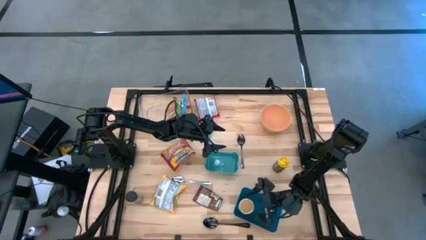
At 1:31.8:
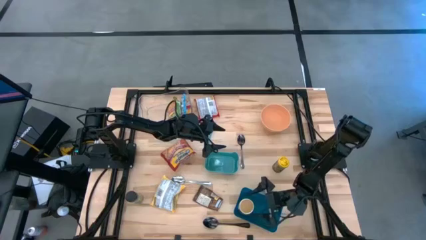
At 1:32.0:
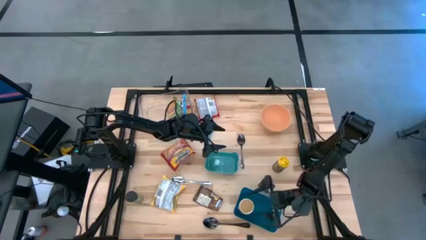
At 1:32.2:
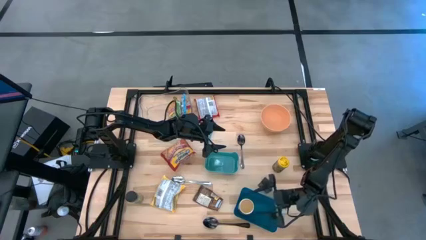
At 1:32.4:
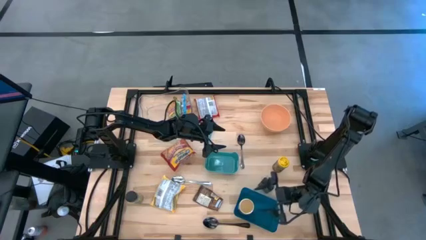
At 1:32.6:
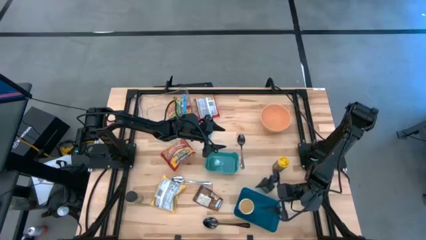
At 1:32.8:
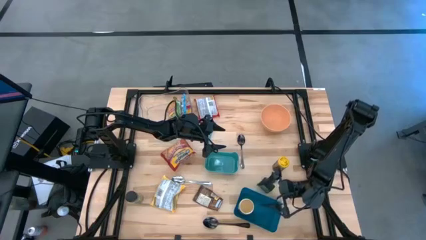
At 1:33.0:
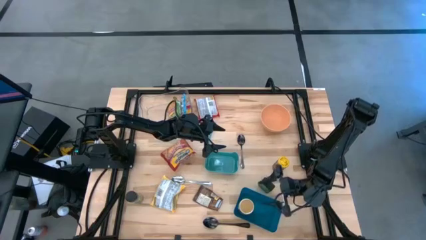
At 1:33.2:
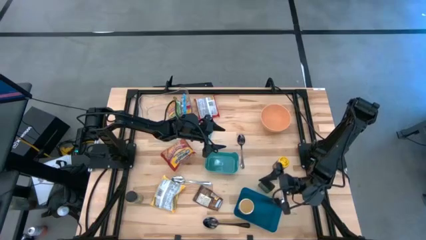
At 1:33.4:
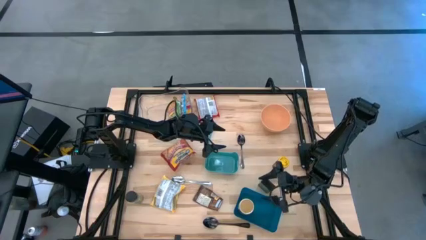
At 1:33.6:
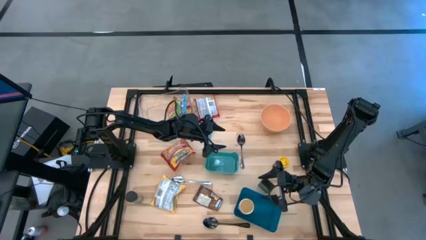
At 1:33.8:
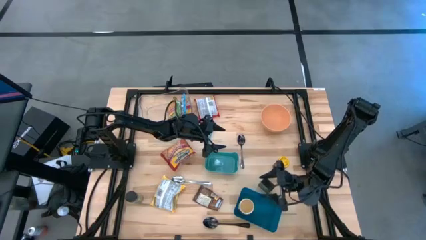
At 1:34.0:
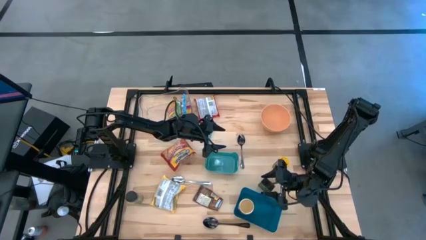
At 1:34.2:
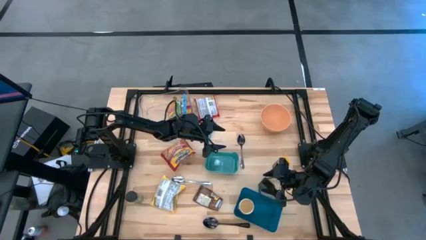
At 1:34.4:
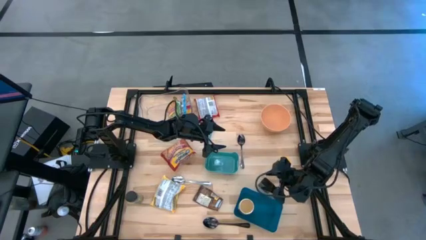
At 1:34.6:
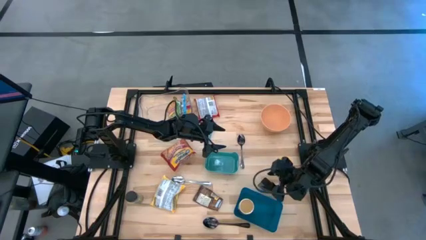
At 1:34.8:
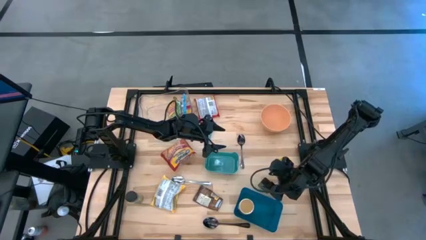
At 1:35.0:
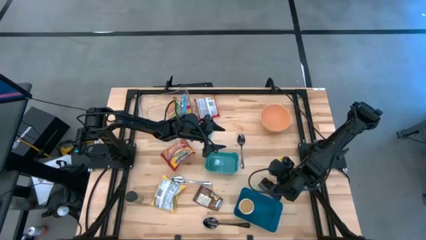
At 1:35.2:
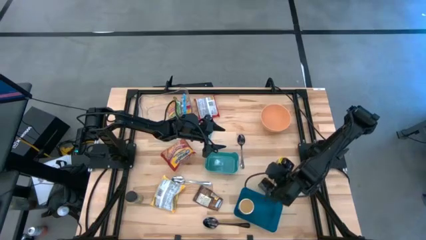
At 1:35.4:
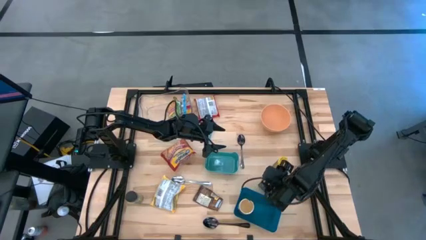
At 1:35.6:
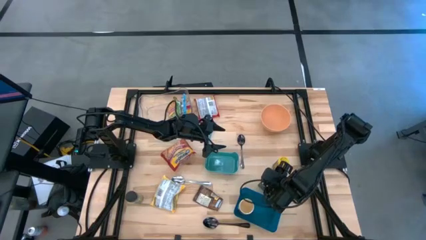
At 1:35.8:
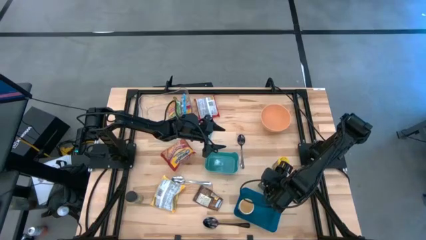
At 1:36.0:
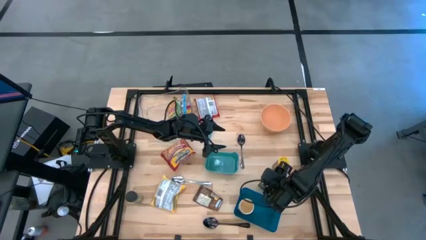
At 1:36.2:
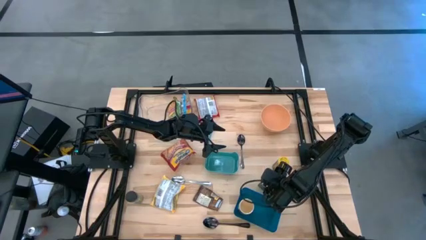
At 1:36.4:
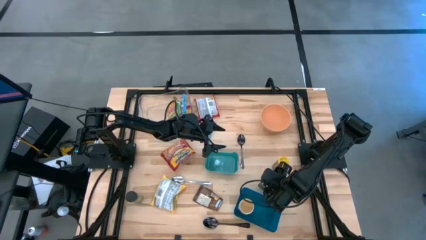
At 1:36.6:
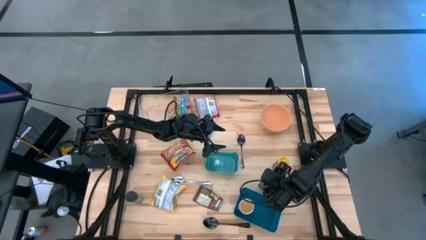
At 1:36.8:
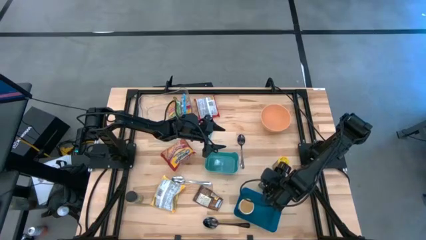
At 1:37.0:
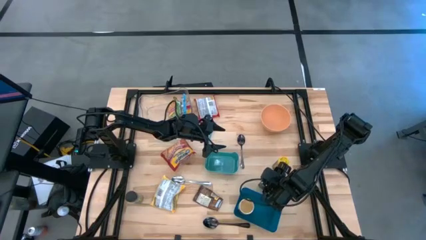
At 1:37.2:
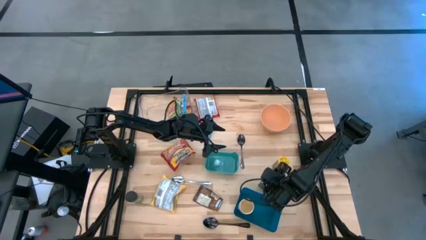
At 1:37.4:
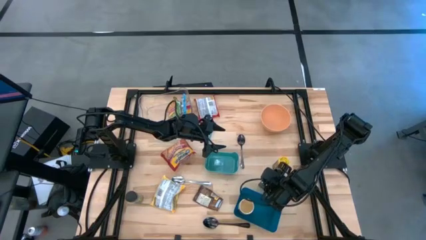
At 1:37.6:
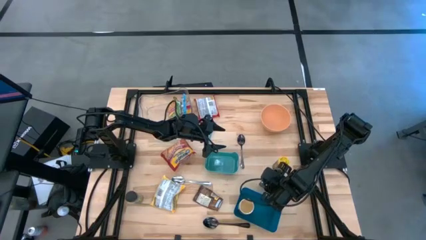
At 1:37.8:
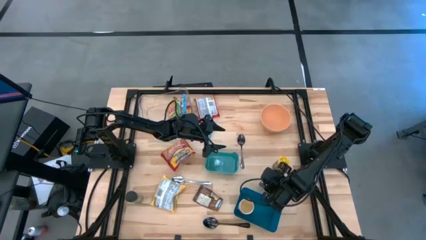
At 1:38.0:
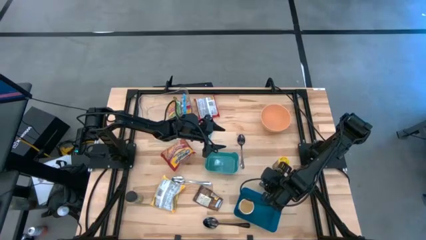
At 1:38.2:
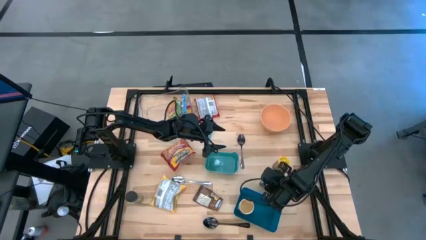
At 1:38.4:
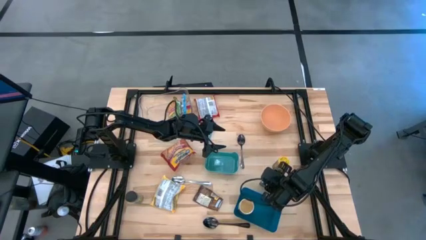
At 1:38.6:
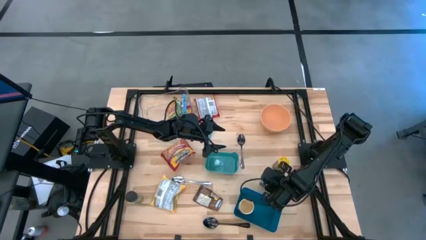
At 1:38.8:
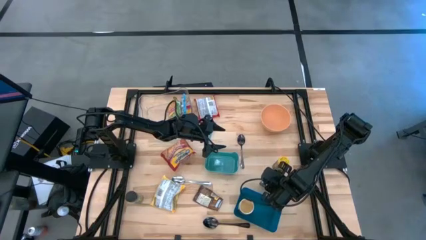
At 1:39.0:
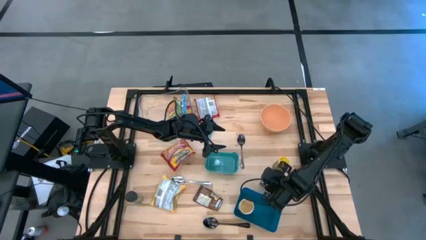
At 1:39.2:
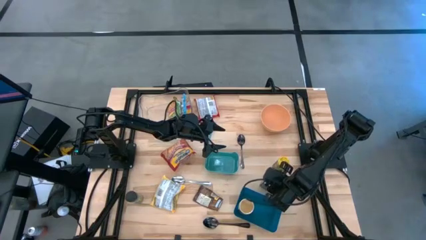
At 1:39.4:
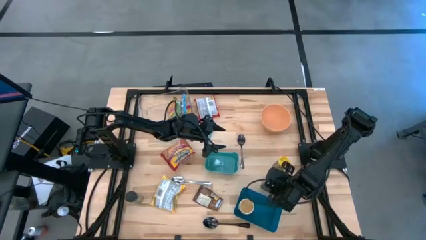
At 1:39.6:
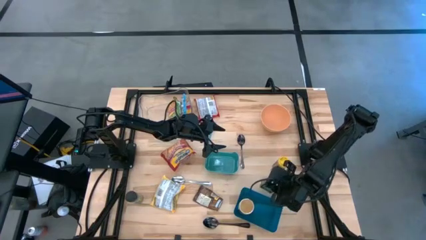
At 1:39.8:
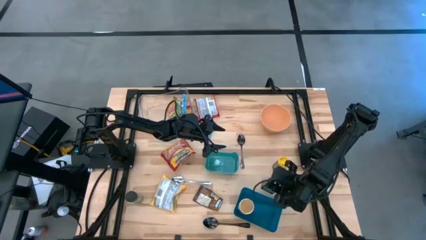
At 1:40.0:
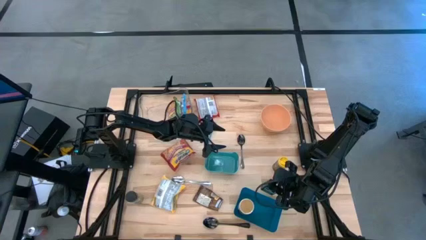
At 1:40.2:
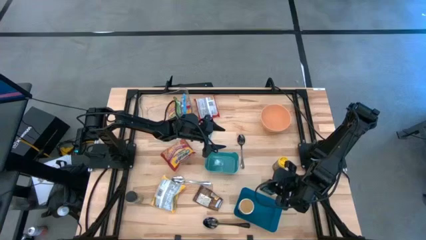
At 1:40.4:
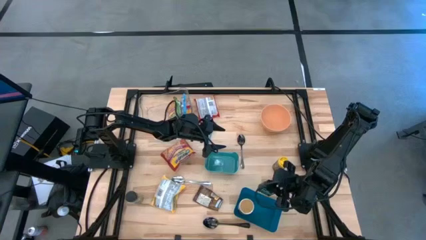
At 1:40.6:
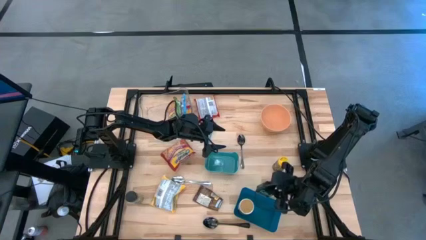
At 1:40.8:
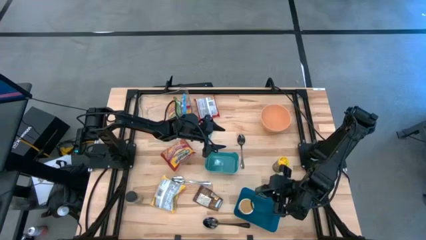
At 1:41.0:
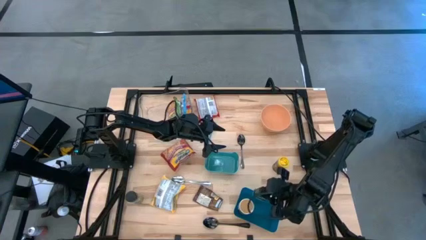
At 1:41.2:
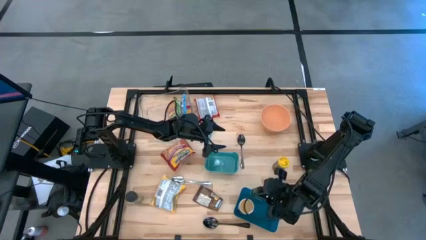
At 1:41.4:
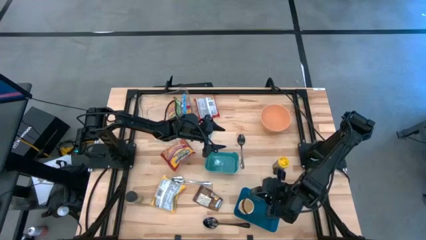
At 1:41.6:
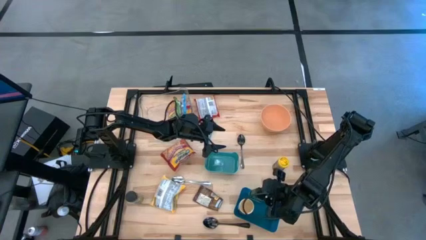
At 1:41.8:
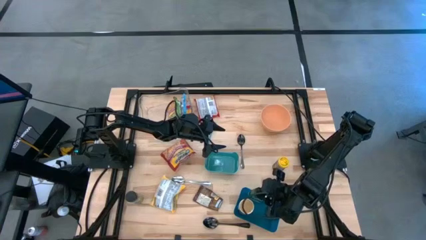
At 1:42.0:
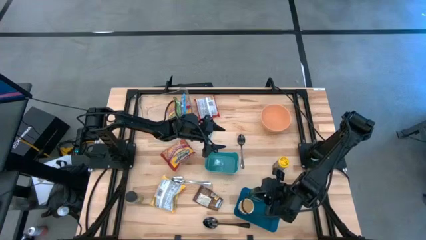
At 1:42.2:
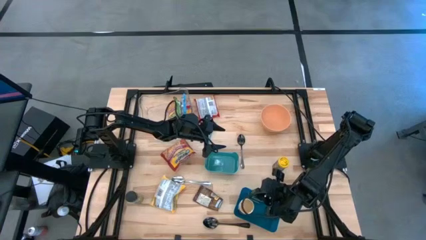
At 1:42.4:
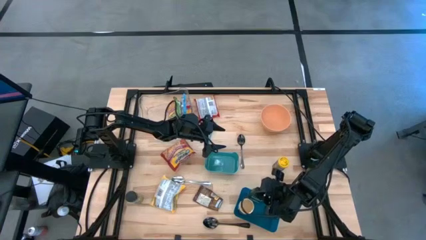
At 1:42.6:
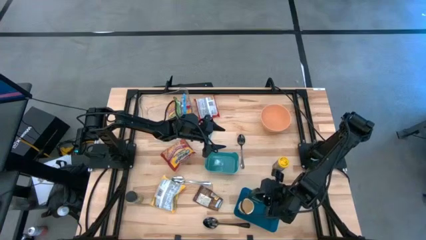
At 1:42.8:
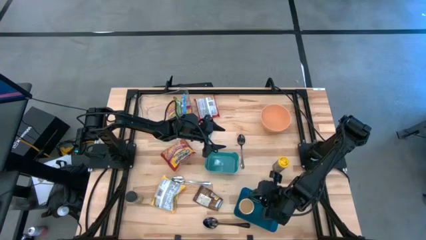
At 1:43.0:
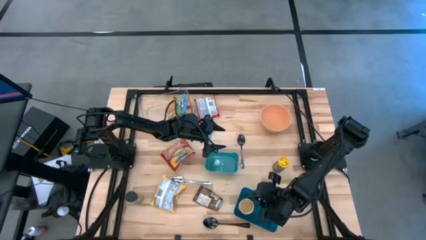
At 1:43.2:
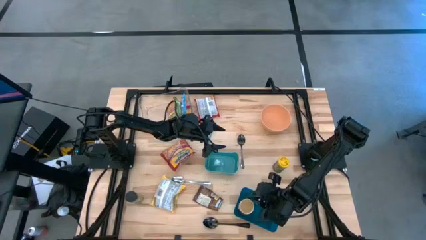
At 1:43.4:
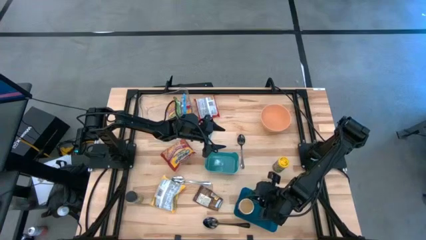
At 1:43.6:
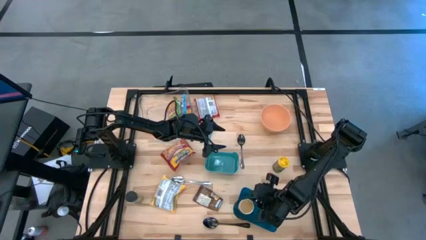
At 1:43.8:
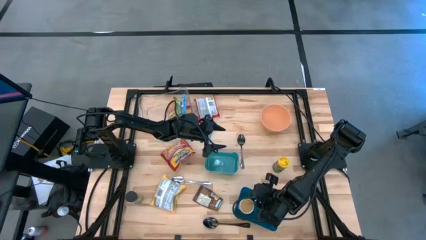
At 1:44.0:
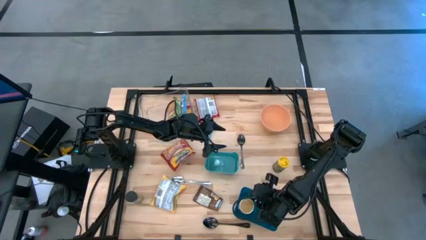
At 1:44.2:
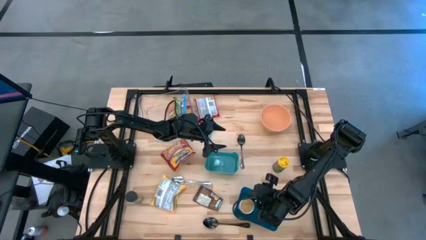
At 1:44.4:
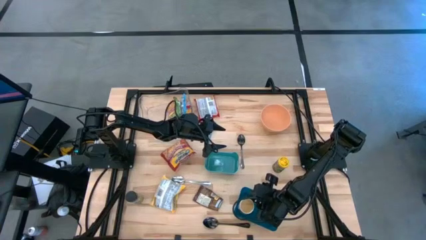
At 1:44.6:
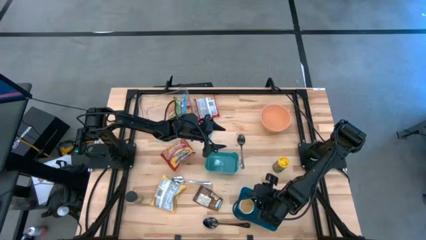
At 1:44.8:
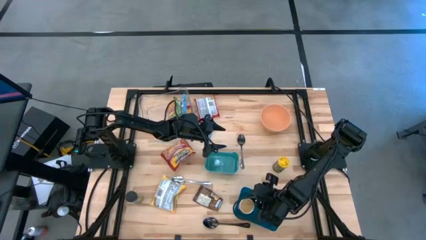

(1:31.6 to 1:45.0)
Task: Pick & Place Food Item
Put the black seasoning can into the blue bin
